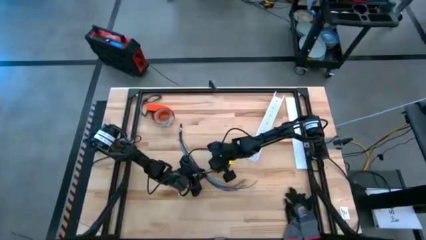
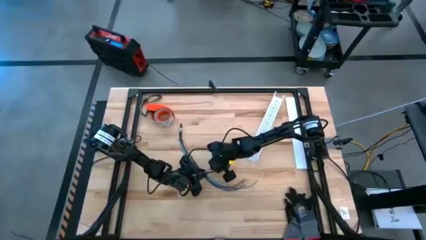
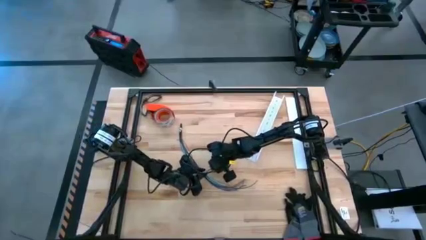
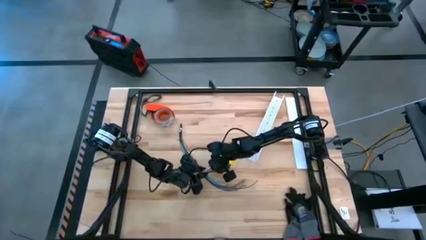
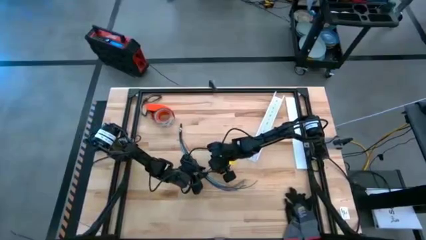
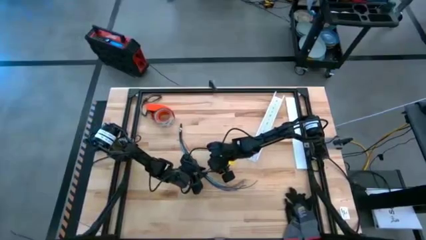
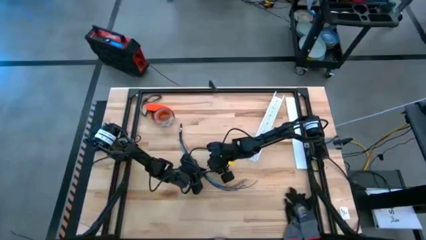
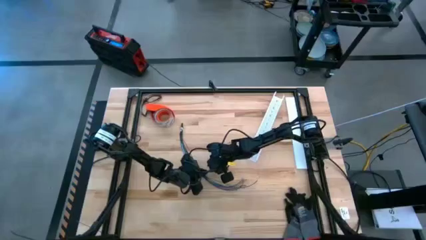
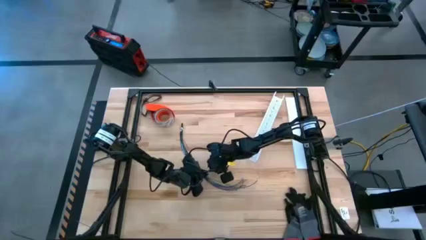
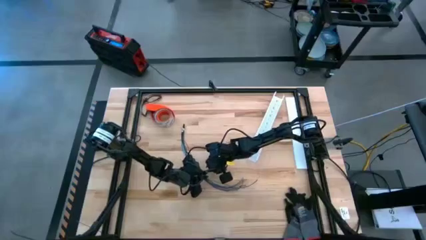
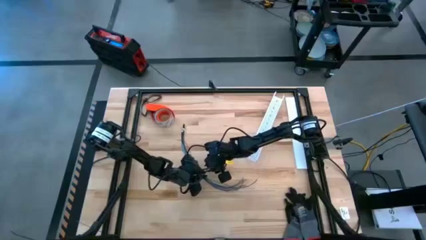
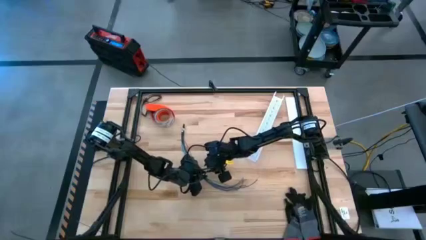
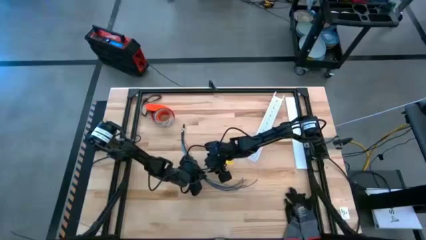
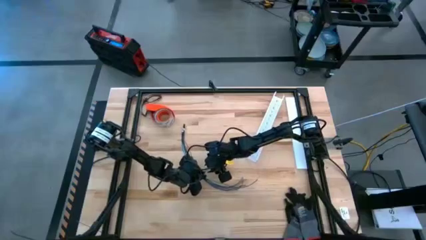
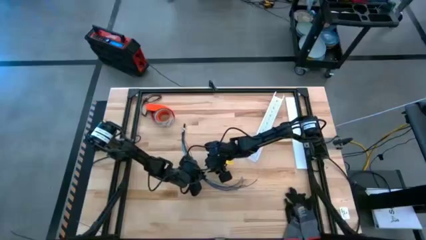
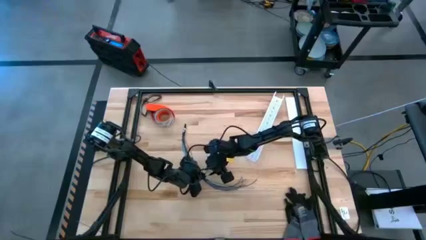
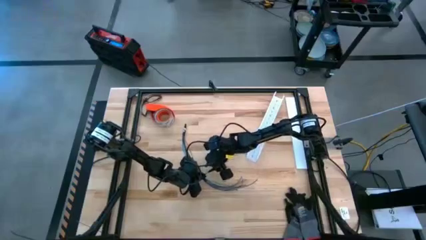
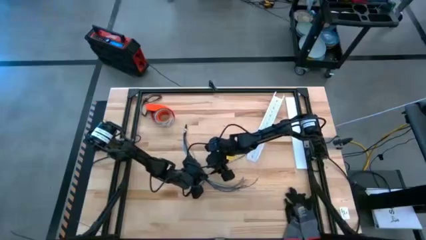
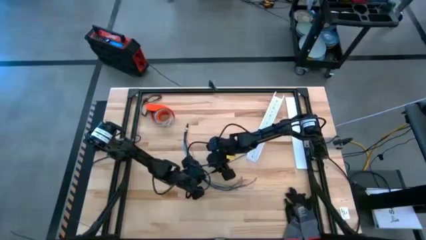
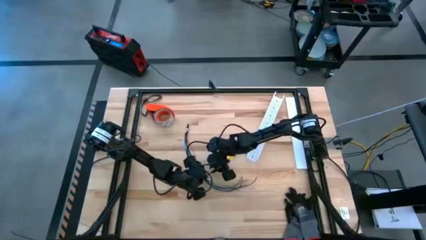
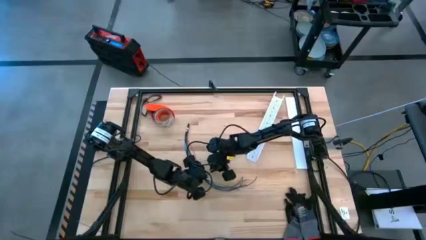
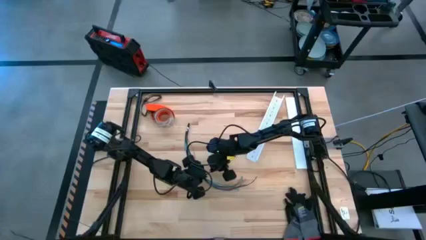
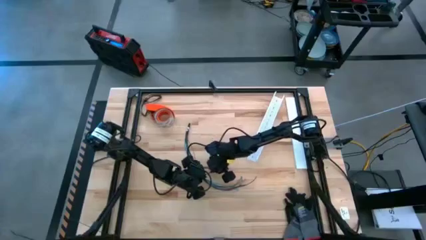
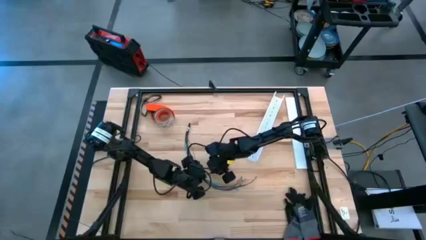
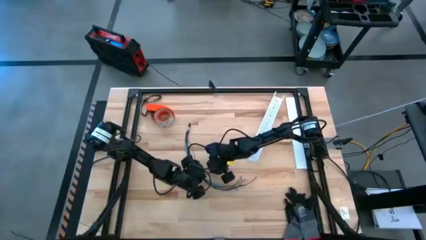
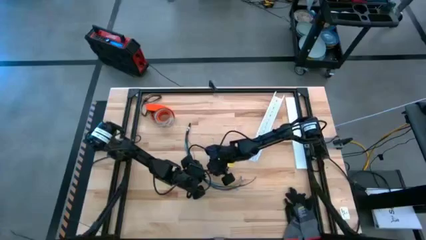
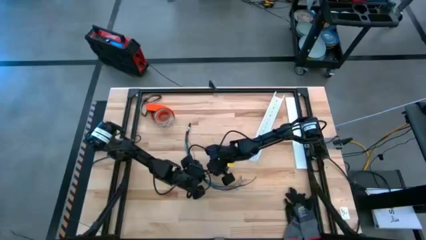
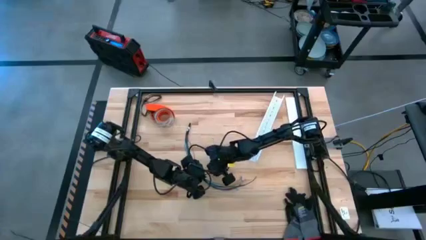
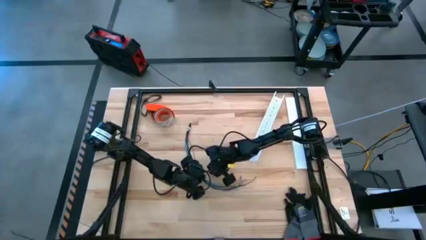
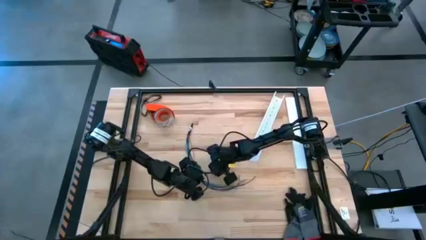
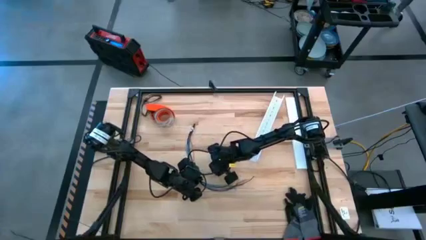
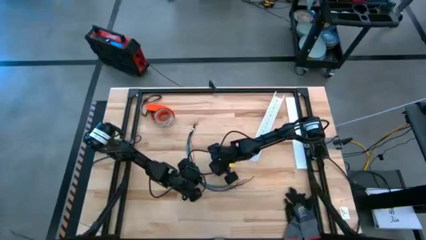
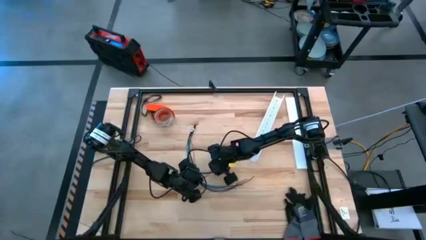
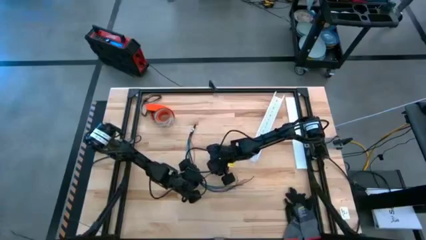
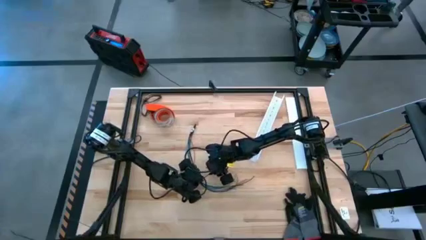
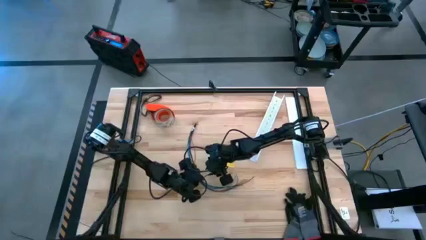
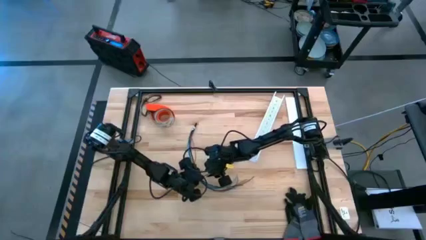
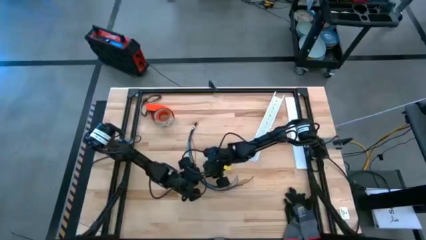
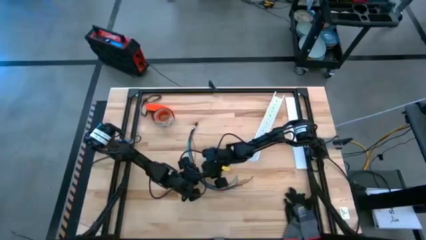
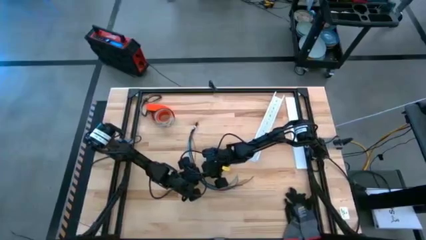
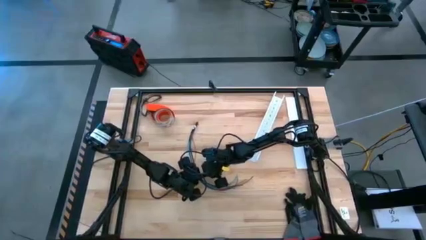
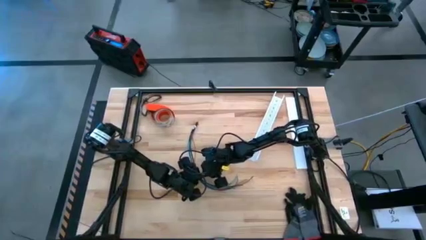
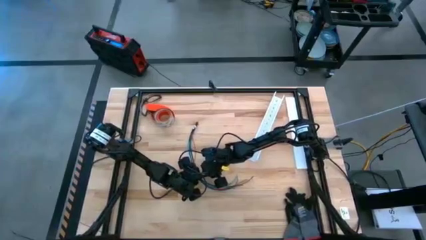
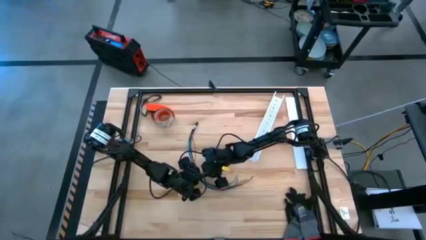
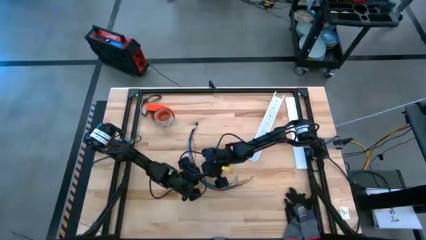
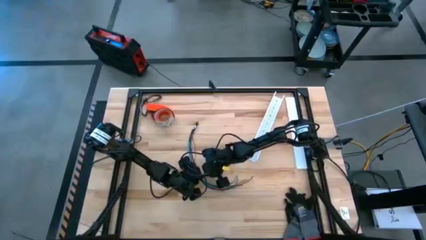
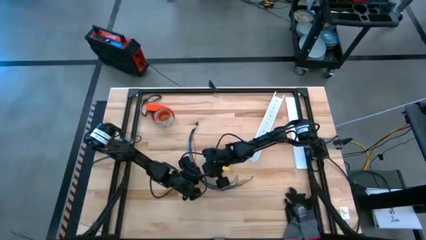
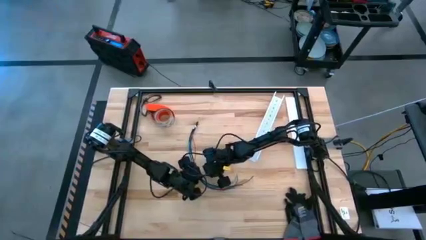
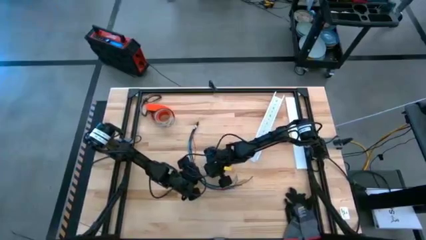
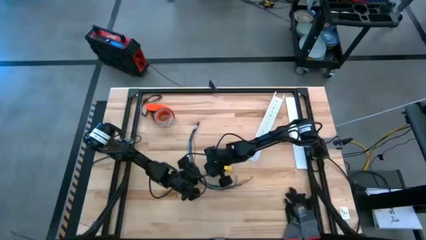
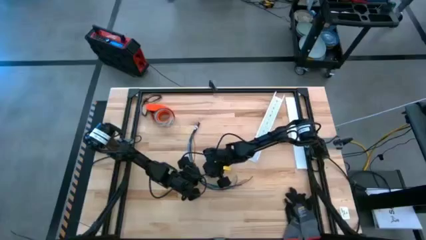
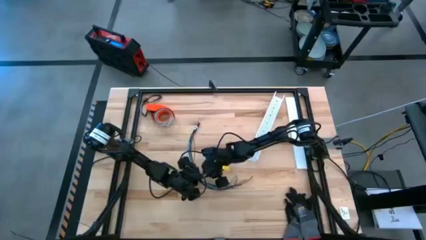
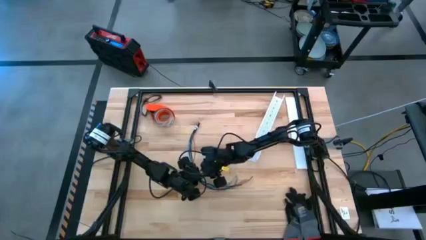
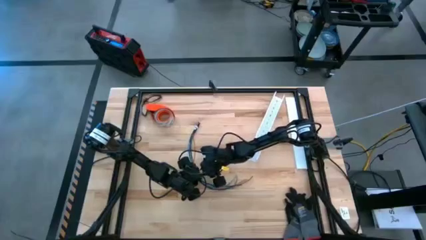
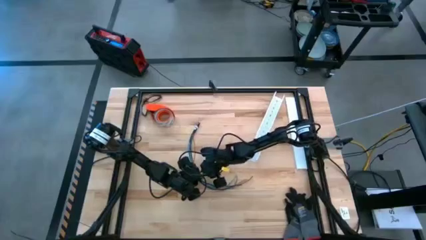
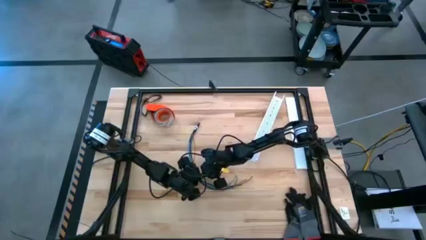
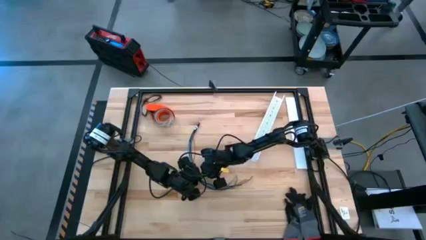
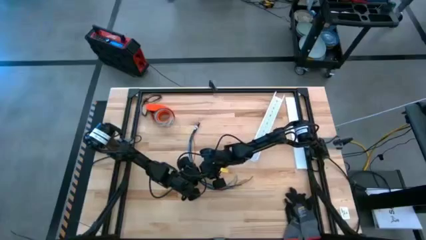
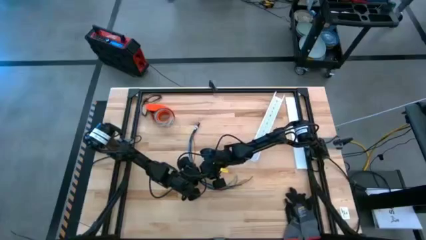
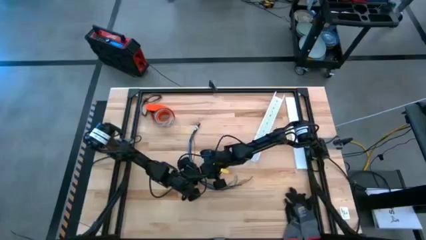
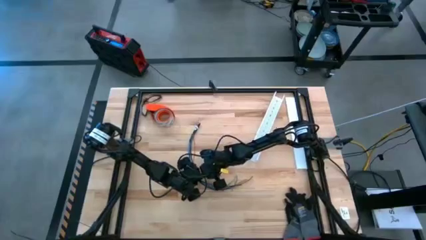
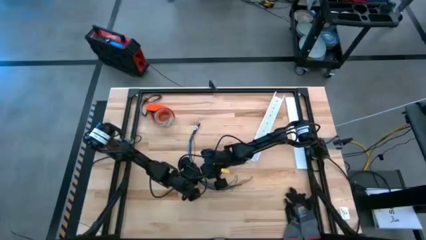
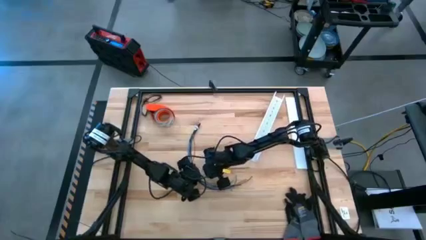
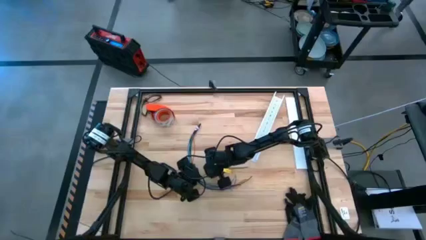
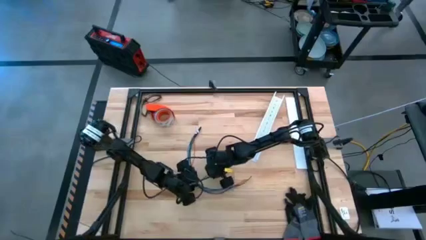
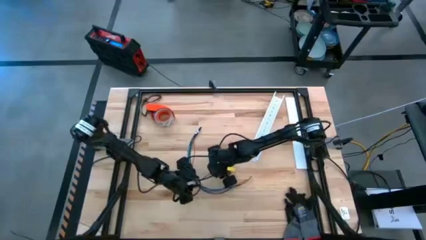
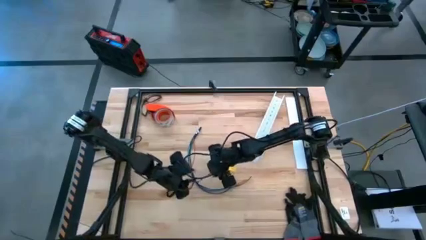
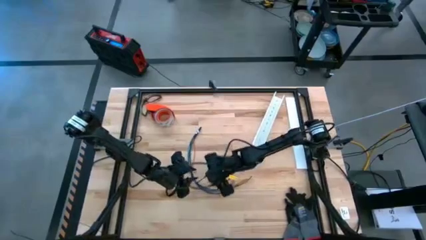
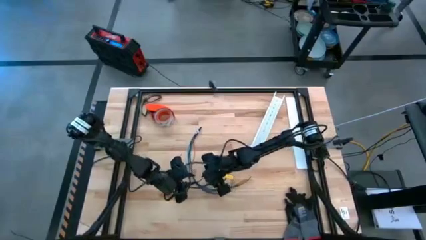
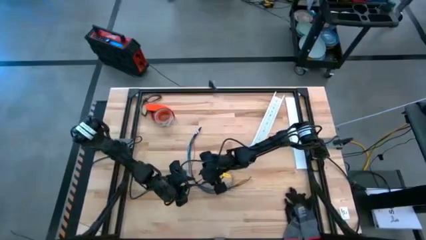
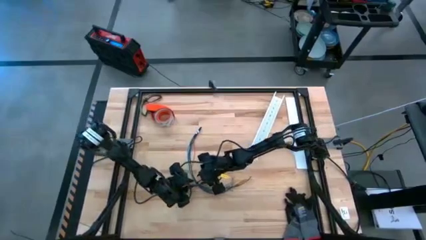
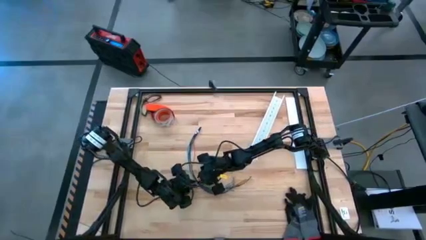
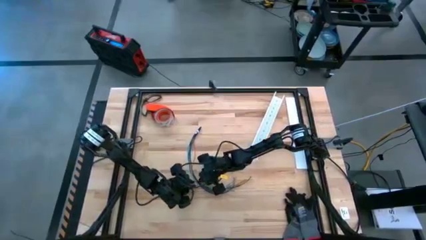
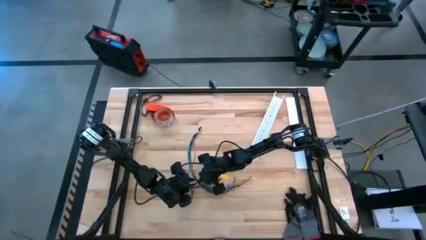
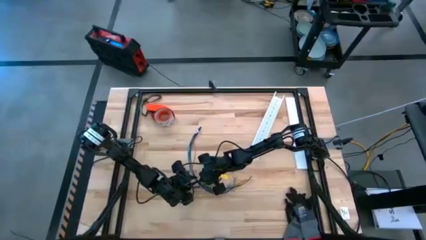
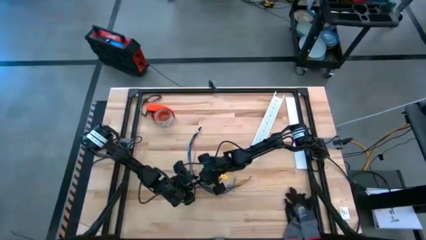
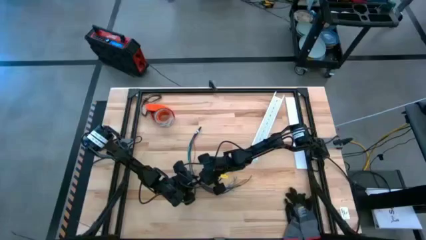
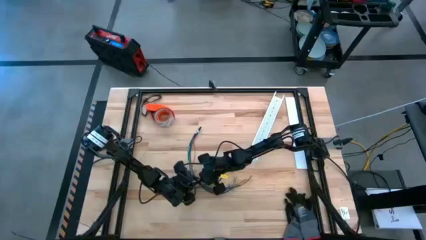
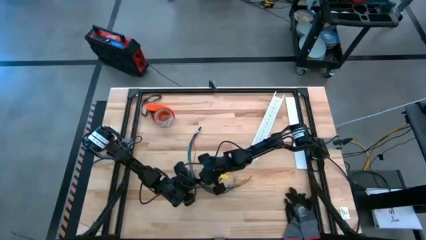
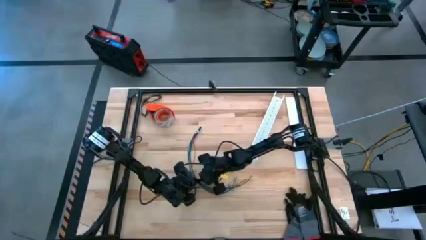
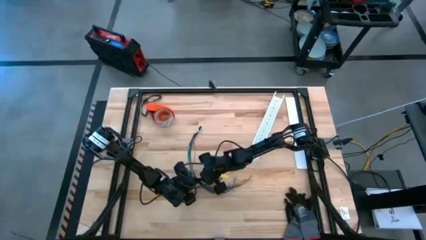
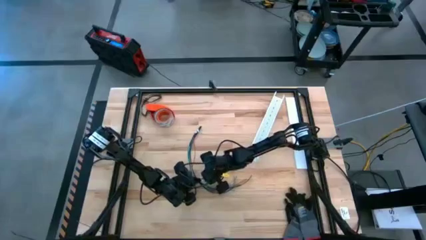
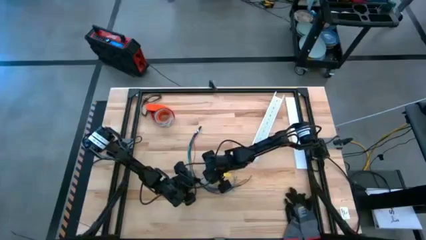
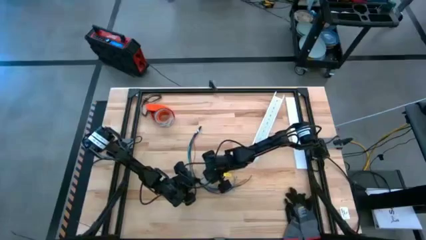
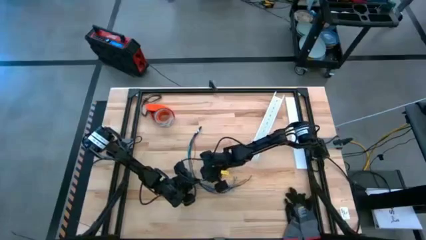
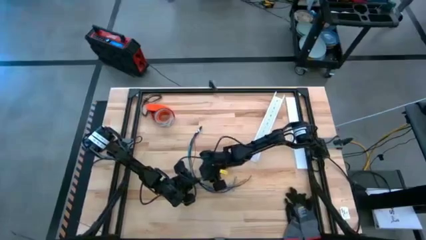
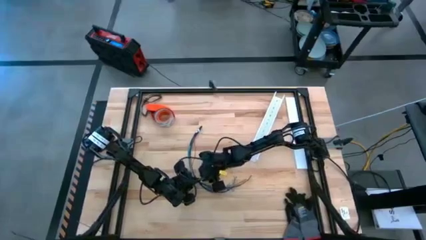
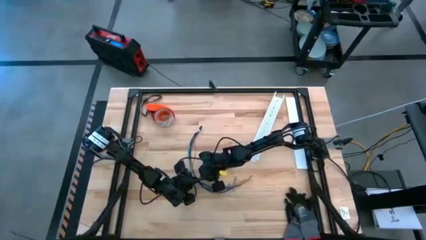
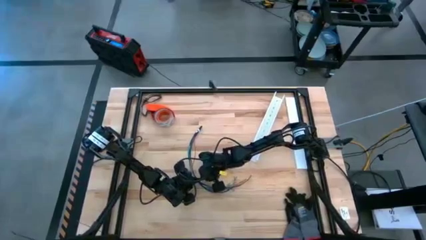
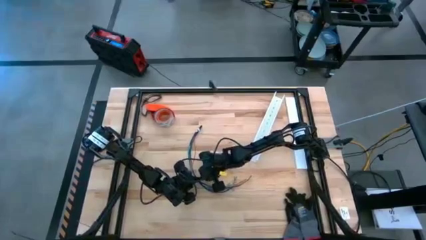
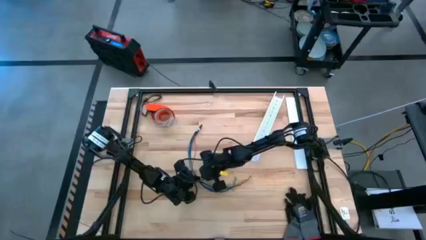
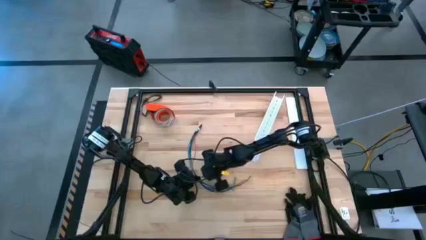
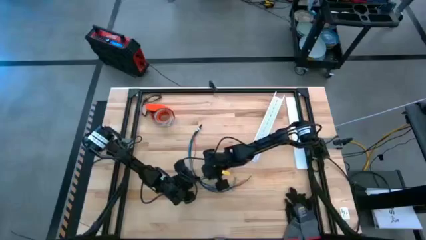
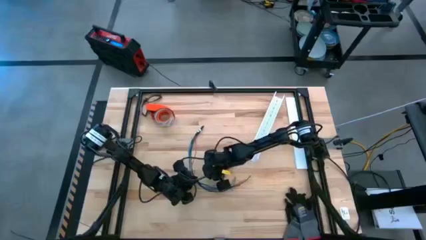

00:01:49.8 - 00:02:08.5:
Task: Ziptie cables
Wrap the cables together using a black zip tie
